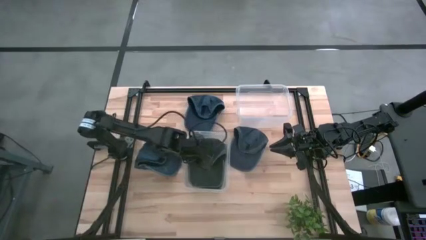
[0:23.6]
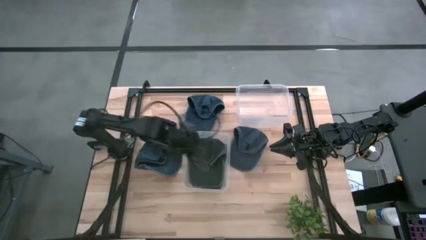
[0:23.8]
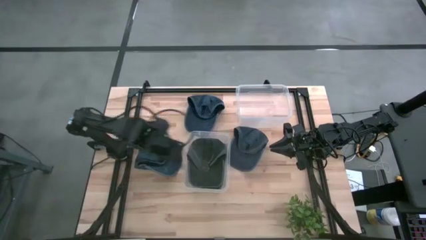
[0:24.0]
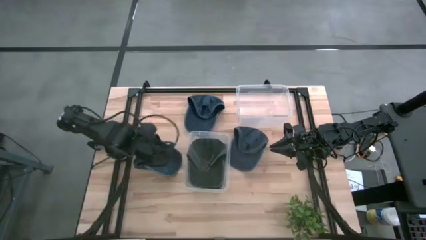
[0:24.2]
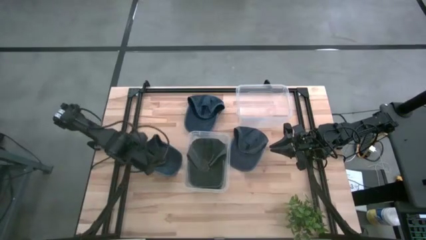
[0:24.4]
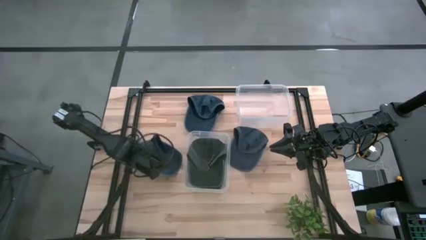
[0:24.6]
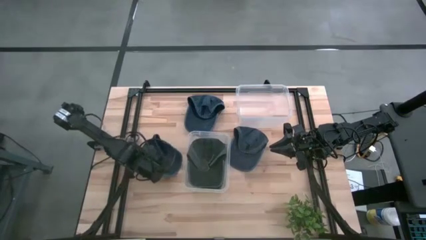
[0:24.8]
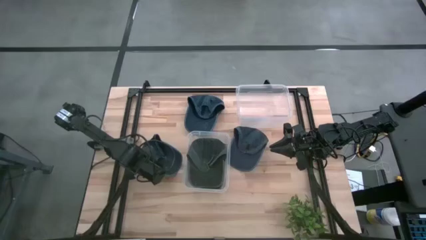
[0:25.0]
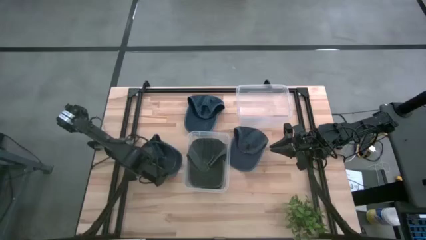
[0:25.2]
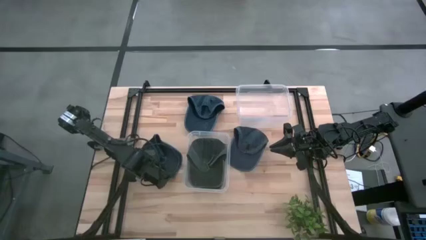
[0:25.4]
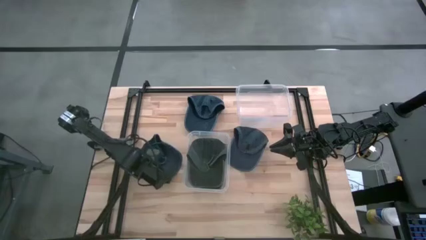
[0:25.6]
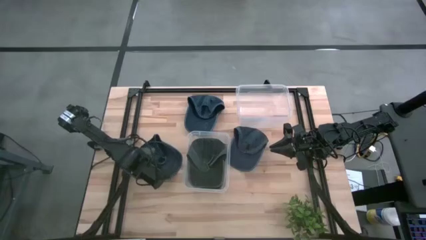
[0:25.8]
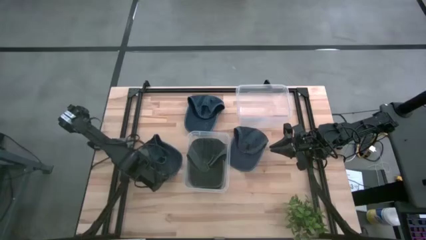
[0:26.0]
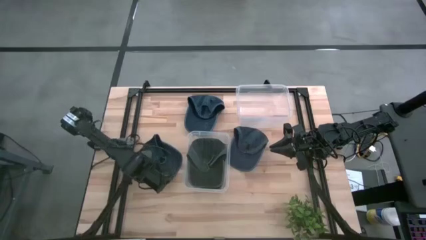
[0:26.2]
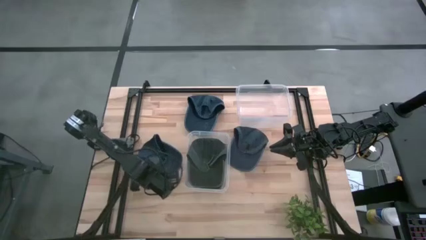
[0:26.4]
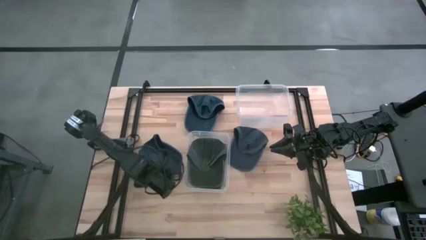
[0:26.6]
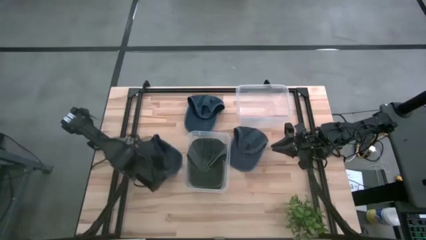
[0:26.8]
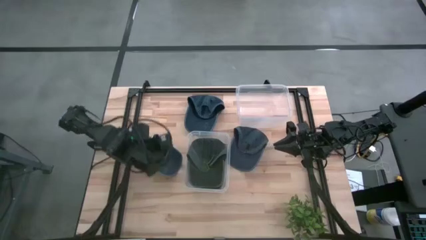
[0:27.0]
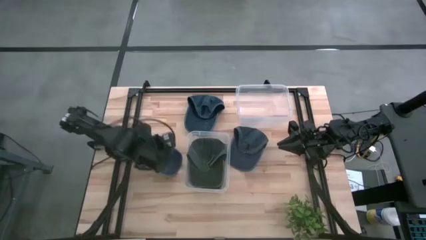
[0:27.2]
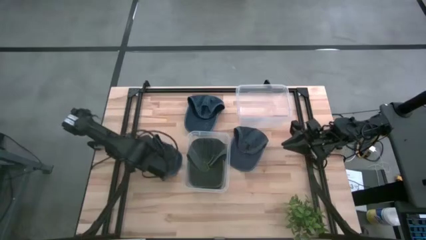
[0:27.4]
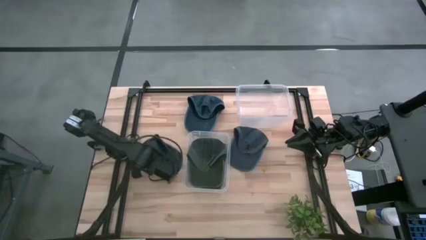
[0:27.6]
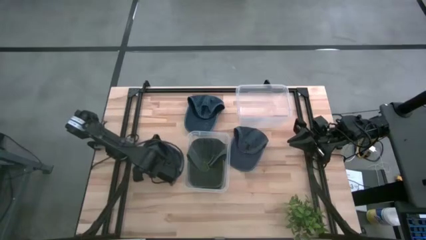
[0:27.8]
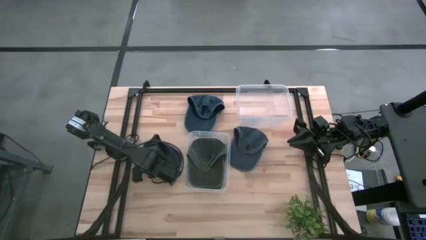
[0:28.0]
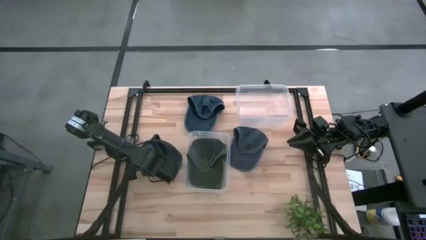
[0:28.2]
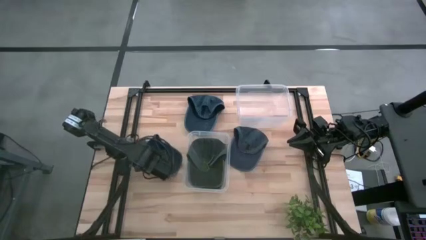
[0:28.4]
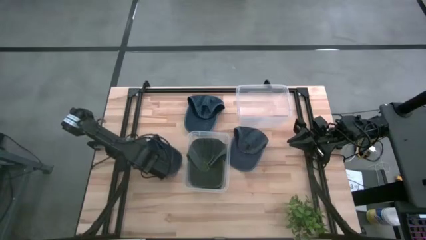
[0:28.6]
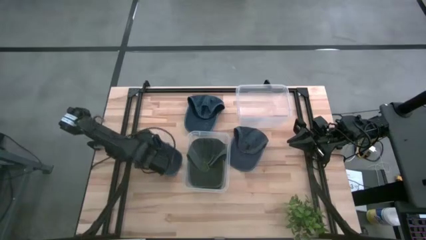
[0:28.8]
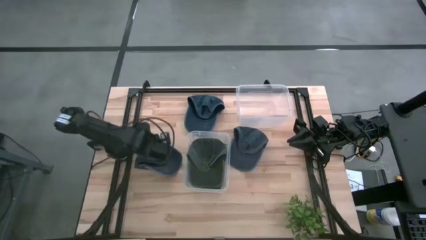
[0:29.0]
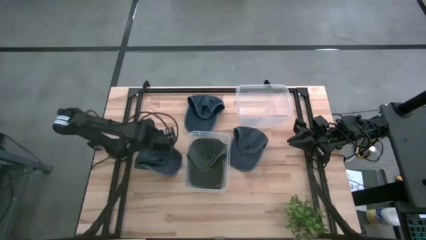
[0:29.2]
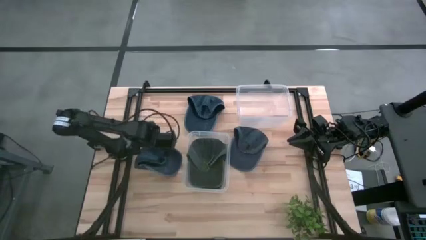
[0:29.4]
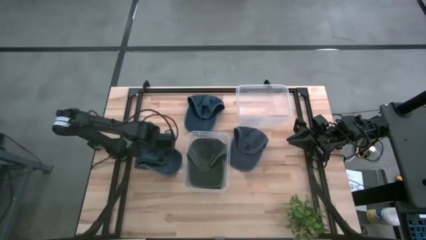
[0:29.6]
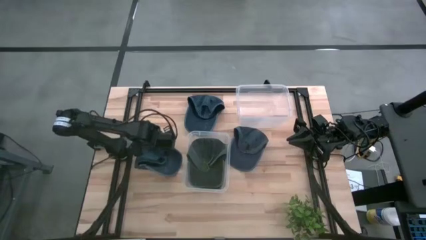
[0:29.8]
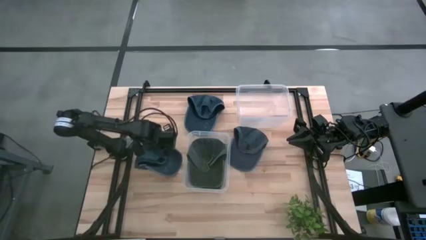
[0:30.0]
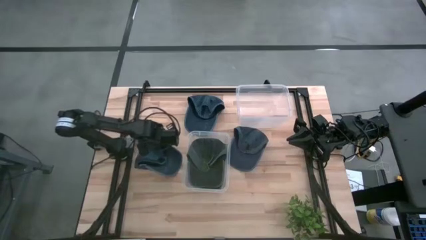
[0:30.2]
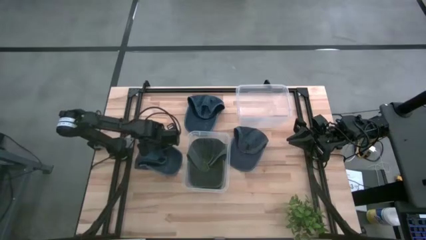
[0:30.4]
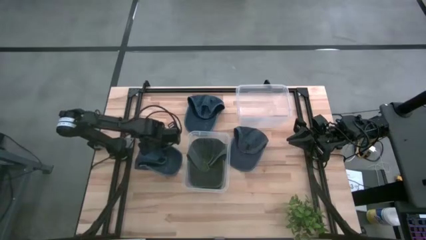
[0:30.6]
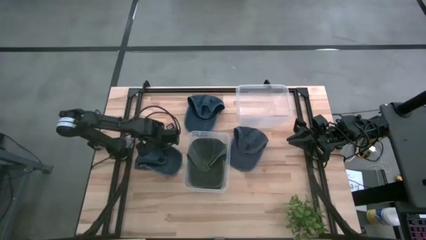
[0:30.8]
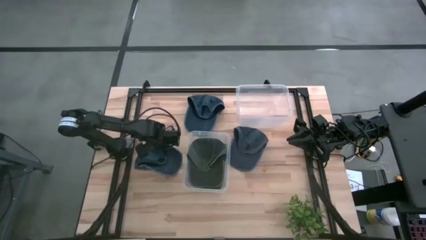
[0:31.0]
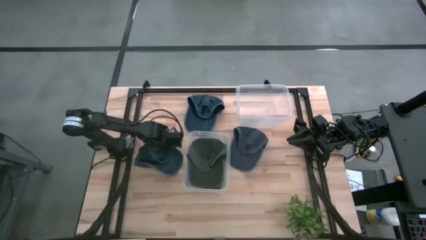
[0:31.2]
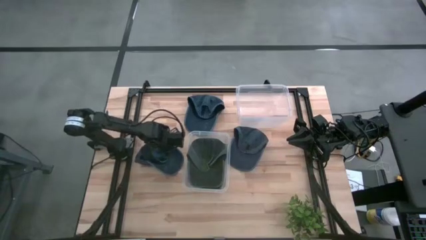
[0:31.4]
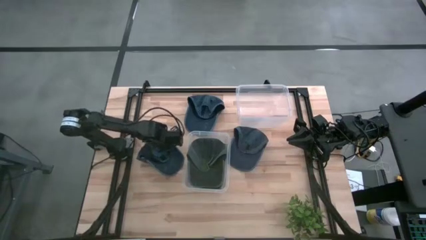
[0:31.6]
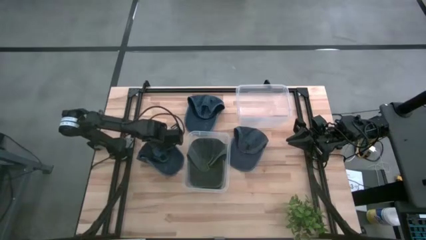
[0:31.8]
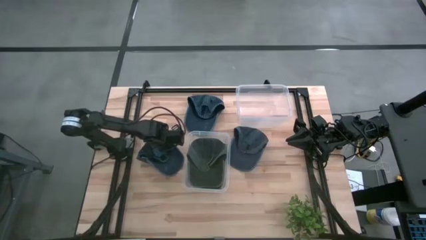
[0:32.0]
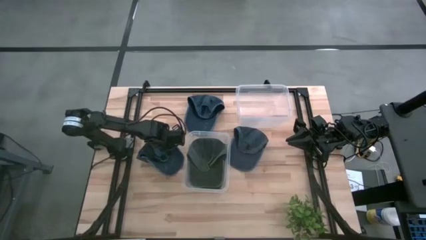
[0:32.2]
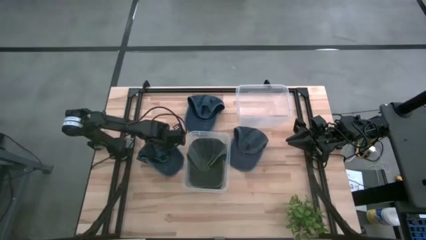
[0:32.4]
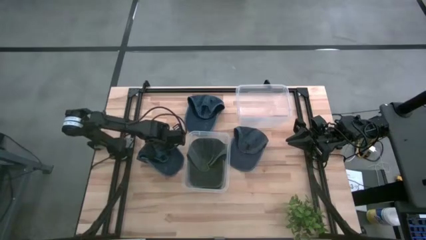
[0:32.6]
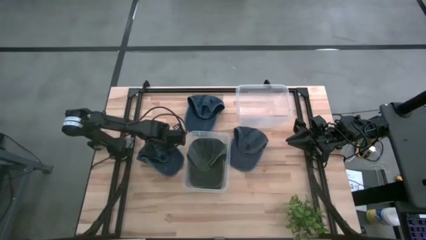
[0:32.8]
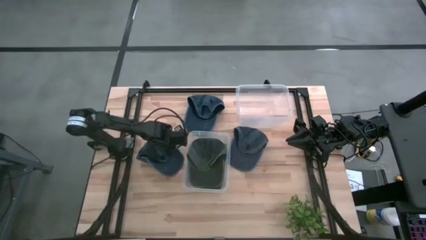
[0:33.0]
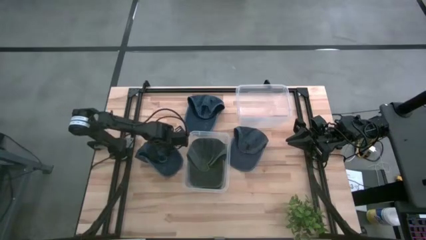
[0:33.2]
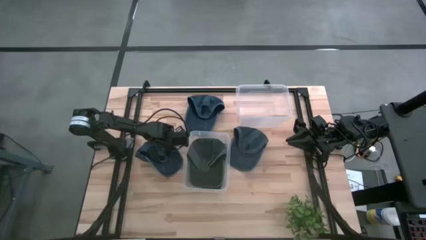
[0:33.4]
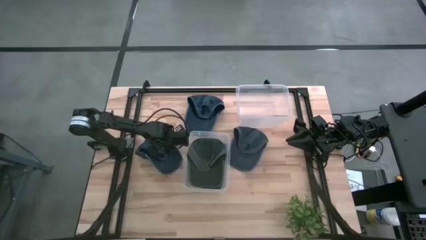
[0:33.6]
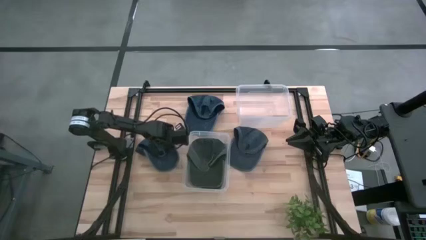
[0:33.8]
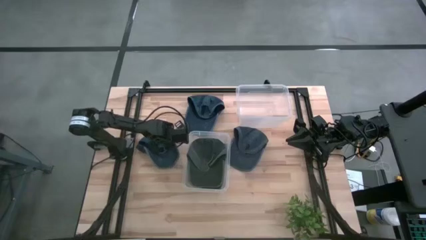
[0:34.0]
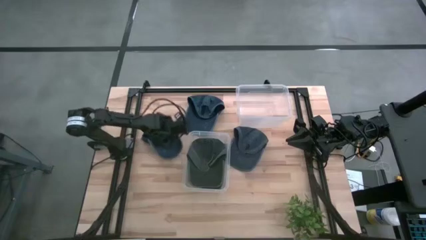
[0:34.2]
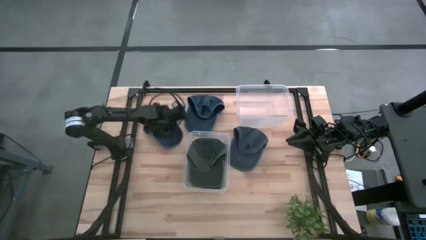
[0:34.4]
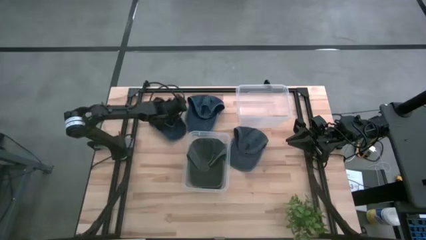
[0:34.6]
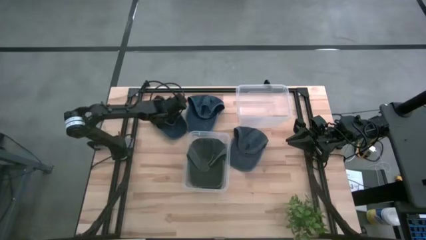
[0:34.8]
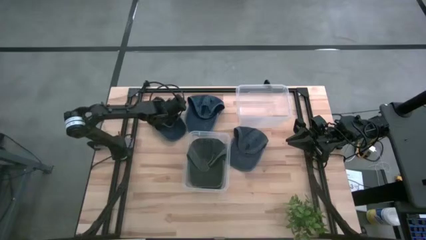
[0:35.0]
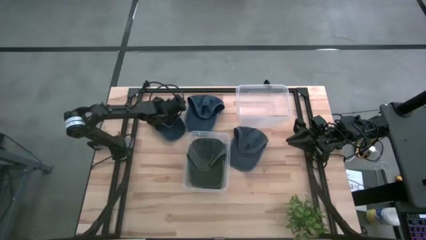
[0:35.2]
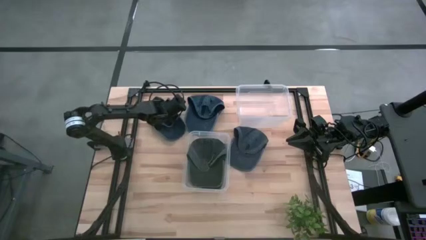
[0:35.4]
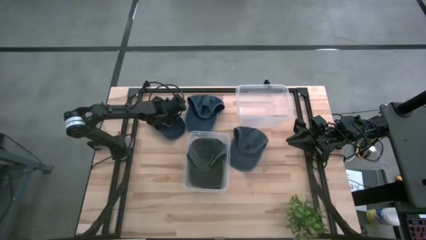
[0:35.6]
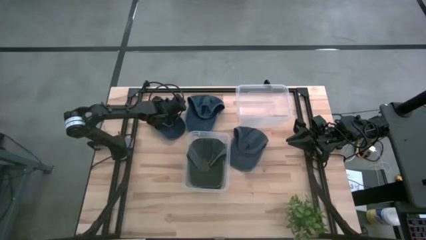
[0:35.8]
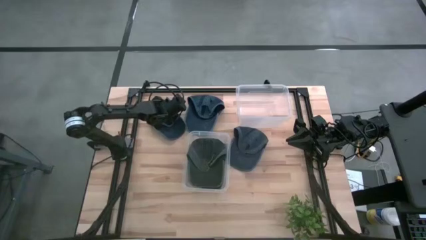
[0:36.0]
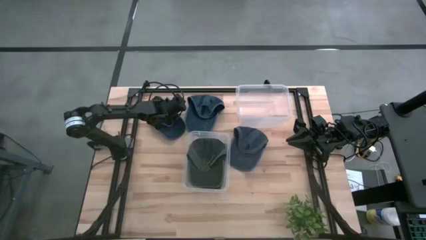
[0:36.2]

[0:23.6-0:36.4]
Task: Pick & Place hat
Put the bottom left blue cap into the top transparent bin

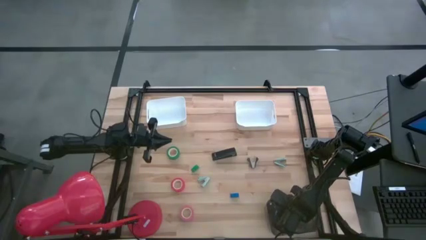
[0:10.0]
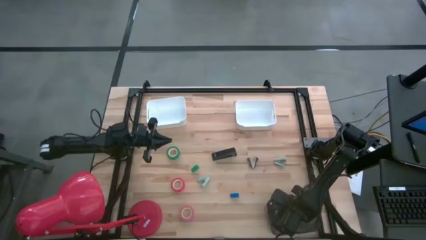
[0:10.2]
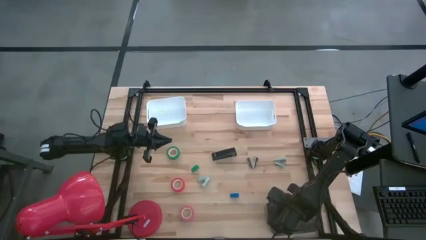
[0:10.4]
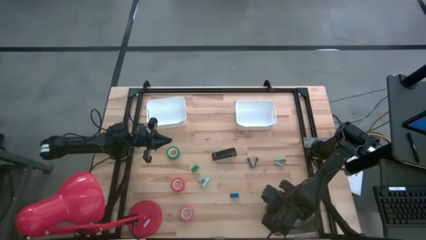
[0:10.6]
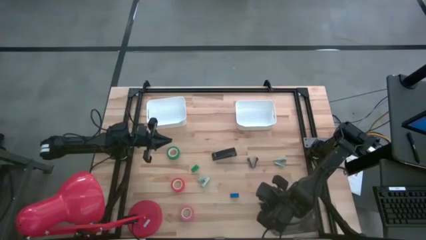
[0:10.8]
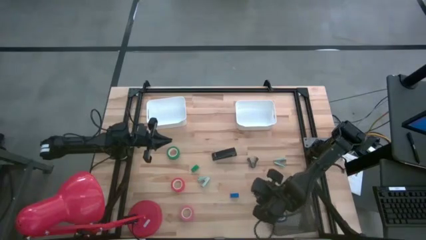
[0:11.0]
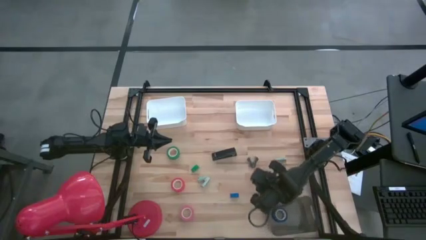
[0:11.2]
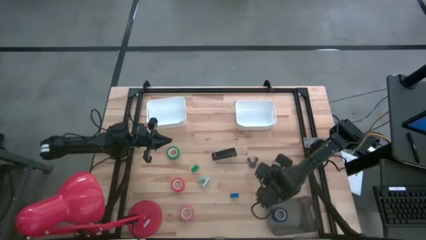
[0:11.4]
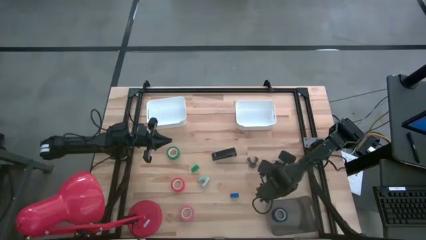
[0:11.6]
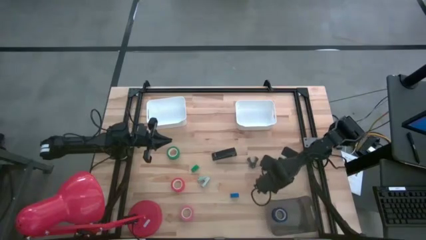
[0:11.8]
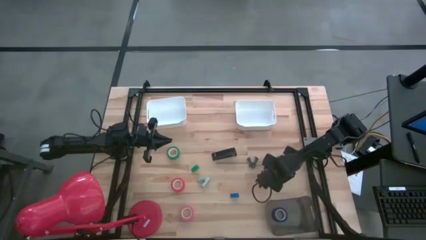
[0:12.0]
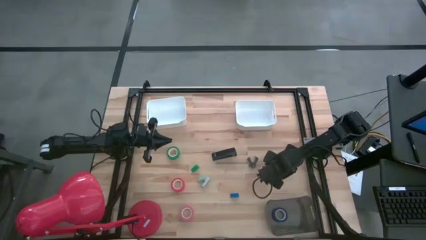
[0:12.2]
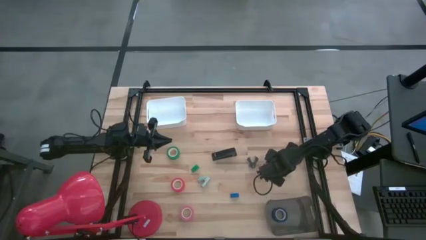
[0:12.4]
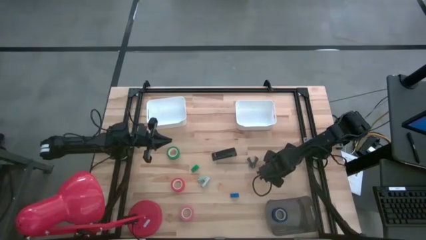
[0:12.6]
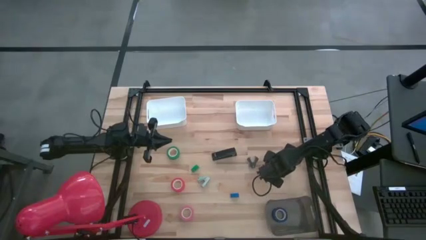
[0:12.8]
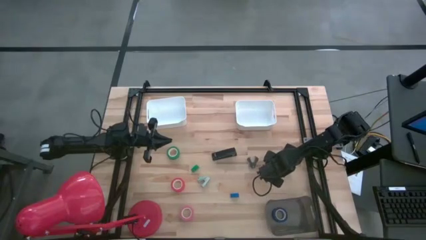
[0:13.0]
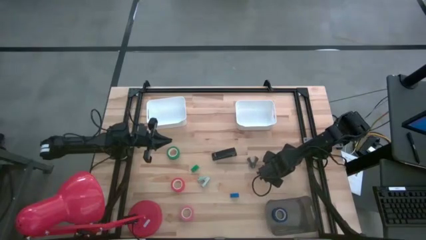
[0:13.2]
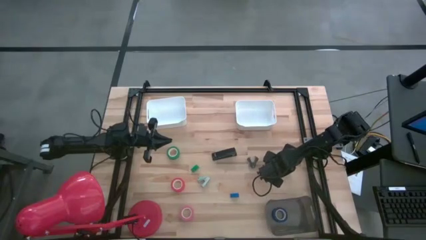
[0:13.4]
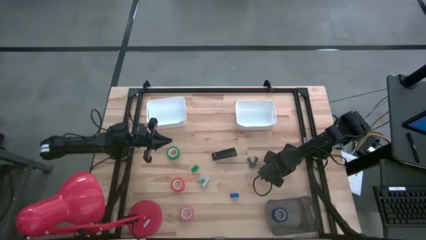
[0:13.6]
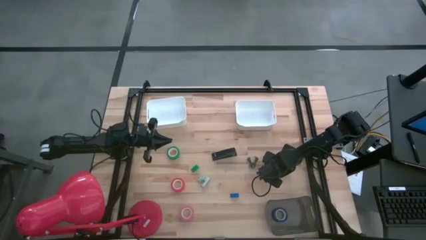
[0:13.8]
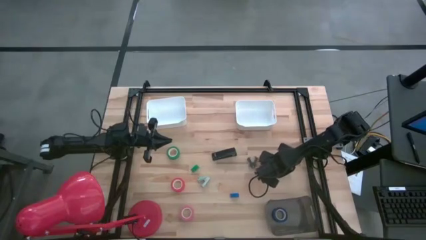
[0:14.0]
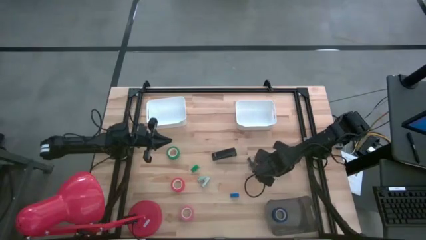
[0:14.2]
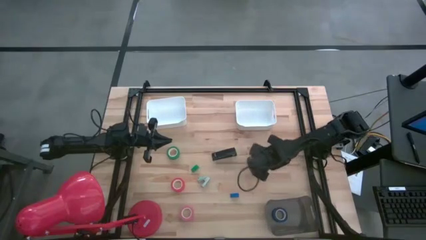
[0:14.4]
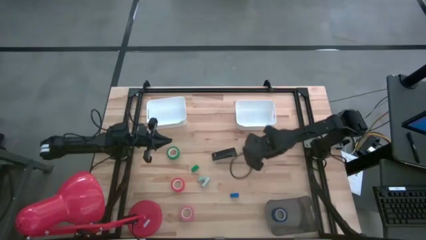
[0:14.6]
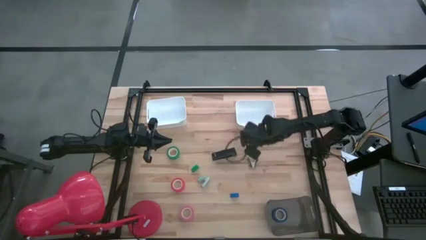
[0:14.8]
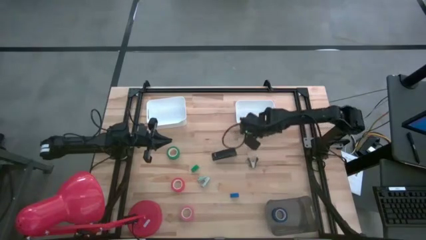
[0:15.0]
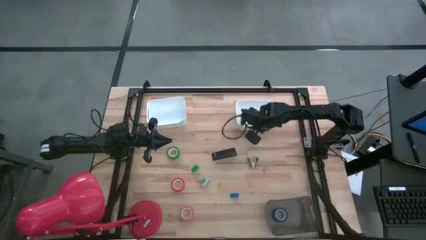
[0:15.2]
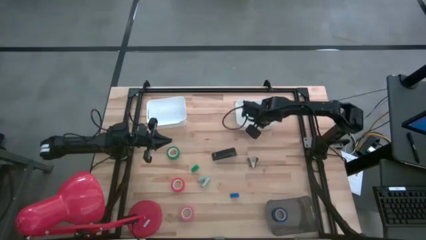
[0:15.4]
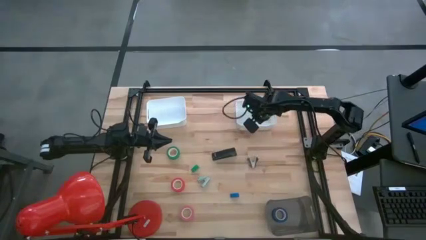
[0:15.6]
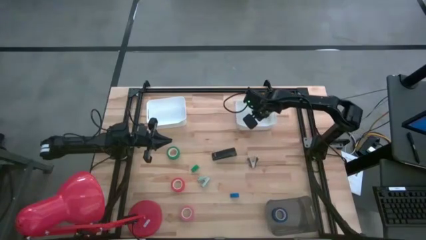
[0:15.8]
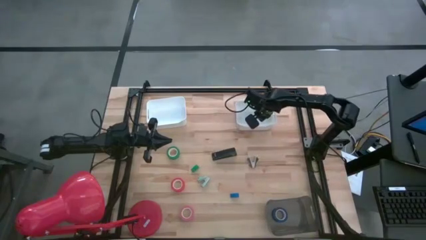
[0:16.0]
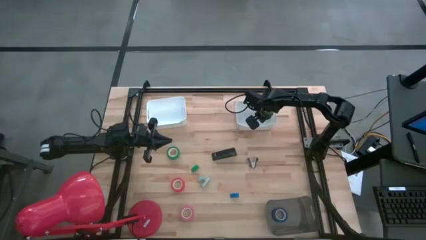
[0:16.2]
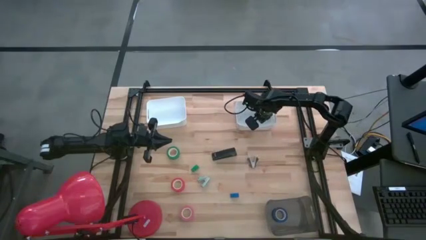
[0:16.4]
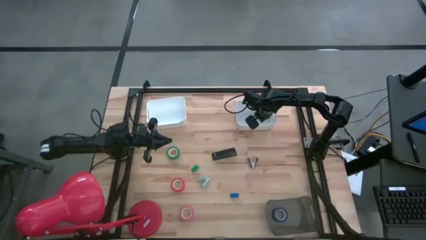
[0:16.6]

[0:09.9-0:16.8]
Task: Pick and place Stapler, Stapler remover, tape
Put the right green staple remover into the right white bin
